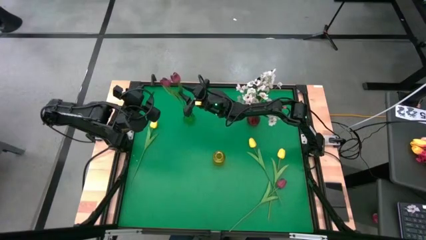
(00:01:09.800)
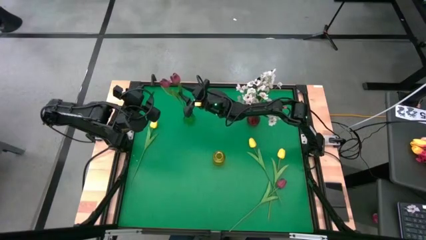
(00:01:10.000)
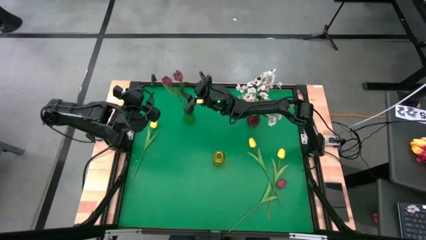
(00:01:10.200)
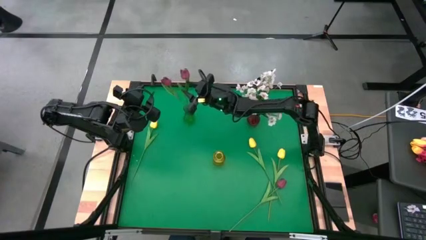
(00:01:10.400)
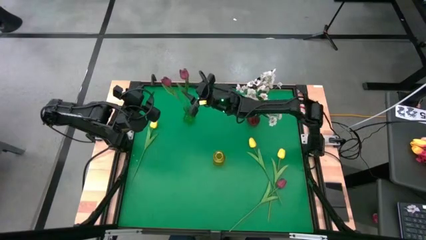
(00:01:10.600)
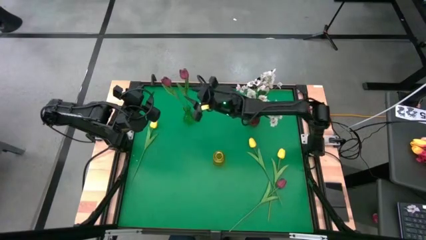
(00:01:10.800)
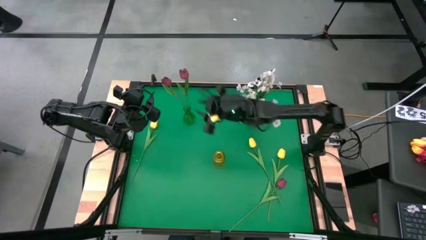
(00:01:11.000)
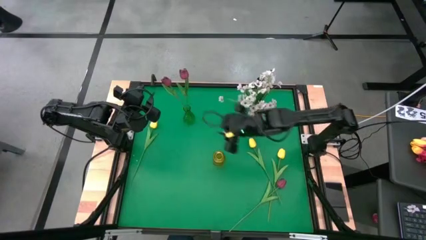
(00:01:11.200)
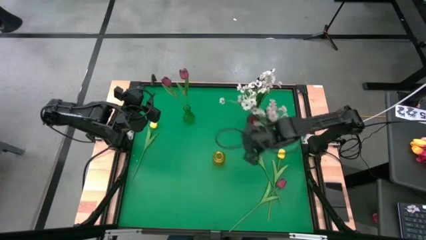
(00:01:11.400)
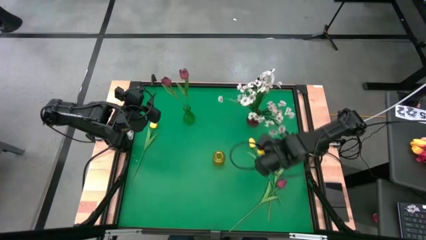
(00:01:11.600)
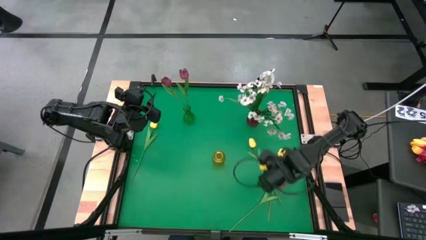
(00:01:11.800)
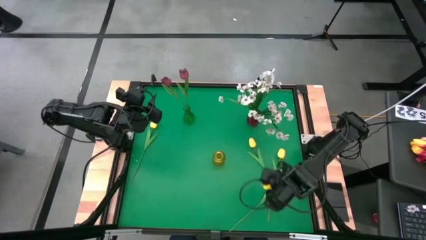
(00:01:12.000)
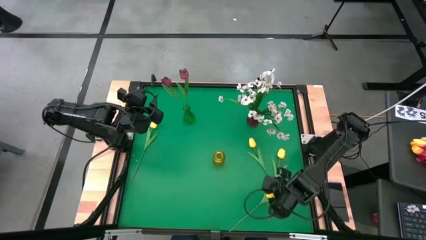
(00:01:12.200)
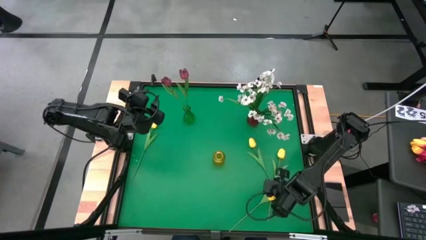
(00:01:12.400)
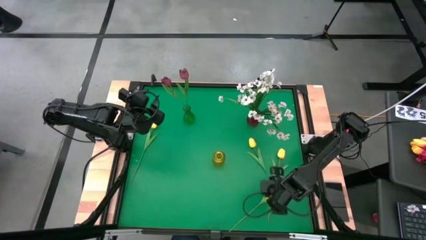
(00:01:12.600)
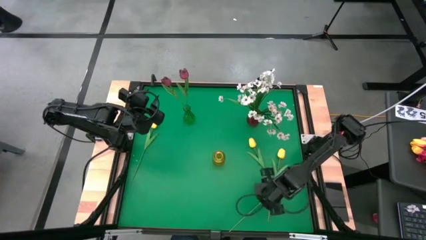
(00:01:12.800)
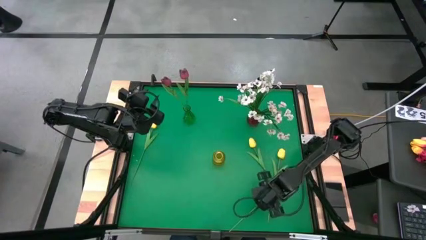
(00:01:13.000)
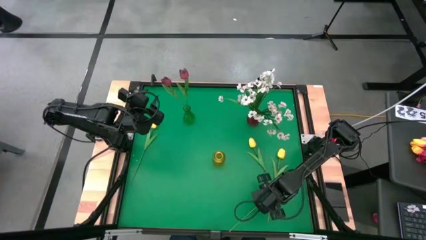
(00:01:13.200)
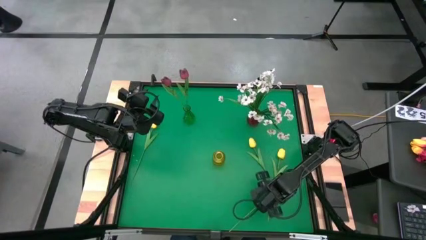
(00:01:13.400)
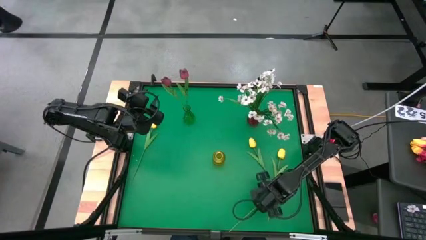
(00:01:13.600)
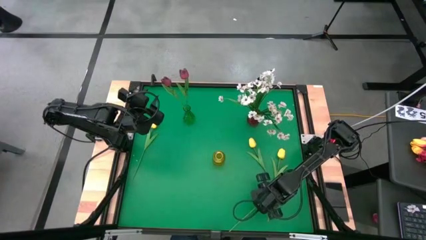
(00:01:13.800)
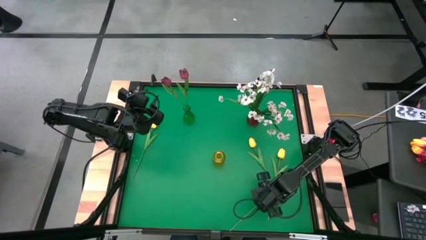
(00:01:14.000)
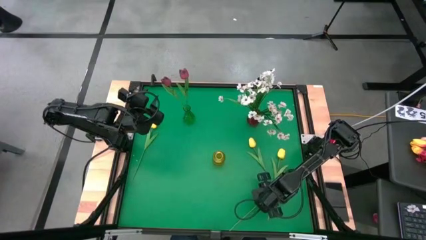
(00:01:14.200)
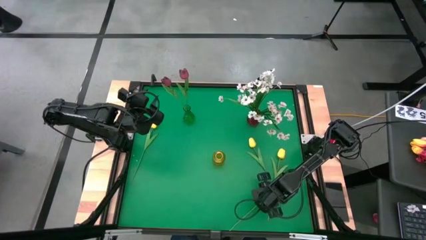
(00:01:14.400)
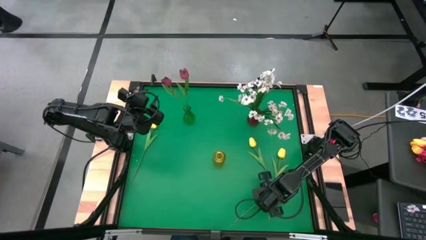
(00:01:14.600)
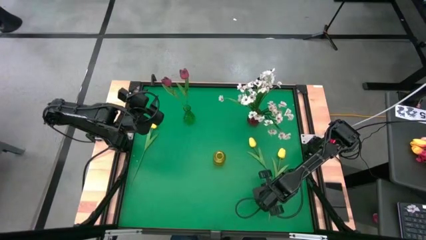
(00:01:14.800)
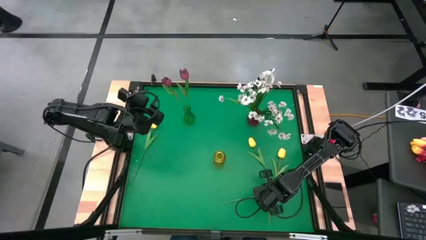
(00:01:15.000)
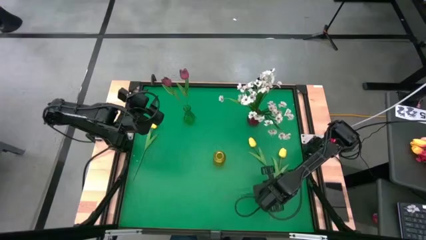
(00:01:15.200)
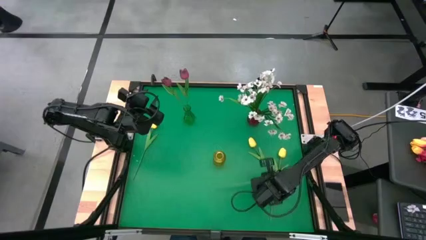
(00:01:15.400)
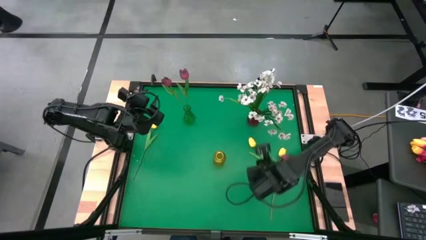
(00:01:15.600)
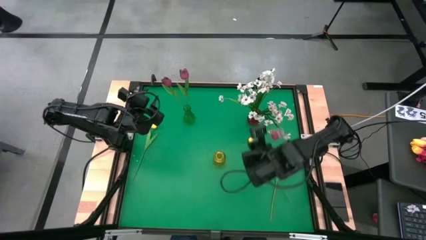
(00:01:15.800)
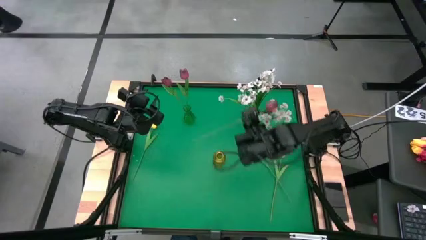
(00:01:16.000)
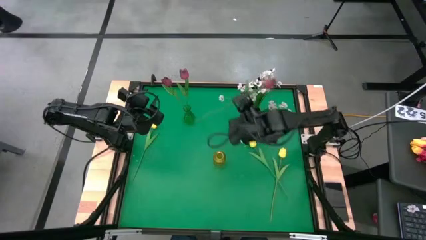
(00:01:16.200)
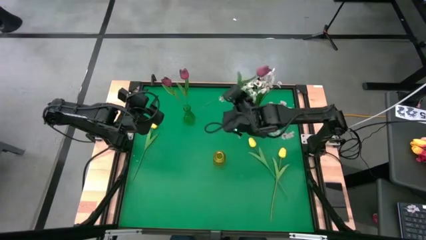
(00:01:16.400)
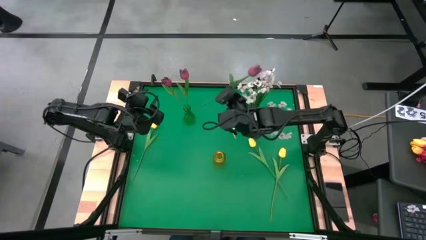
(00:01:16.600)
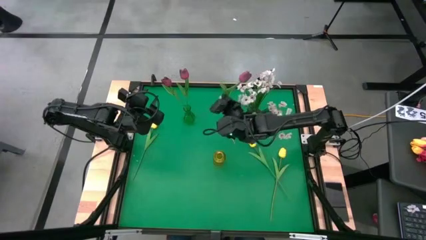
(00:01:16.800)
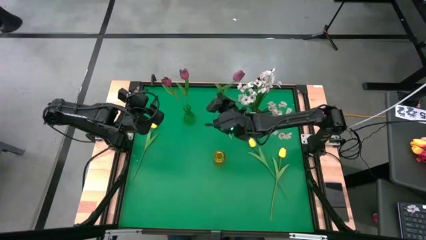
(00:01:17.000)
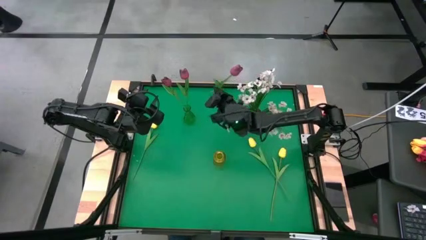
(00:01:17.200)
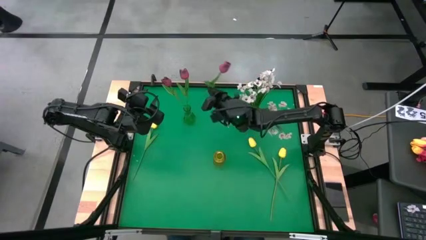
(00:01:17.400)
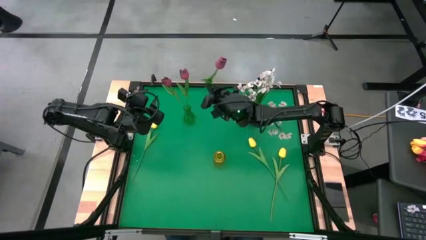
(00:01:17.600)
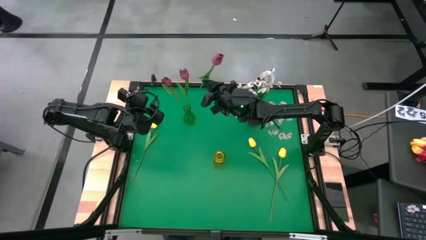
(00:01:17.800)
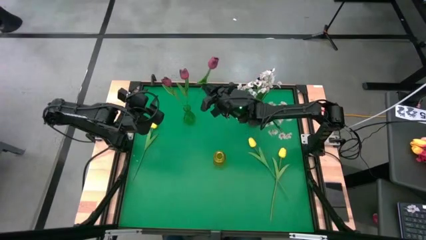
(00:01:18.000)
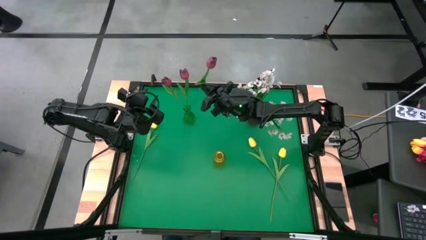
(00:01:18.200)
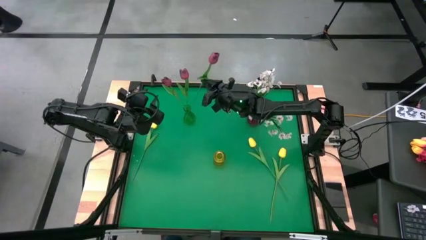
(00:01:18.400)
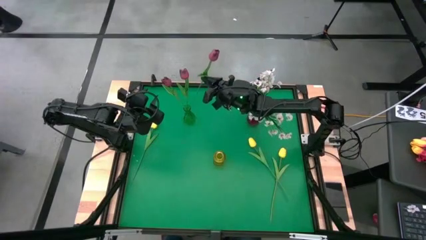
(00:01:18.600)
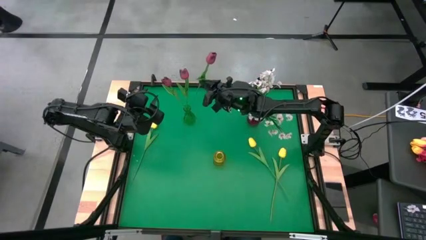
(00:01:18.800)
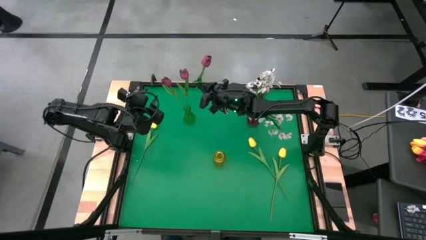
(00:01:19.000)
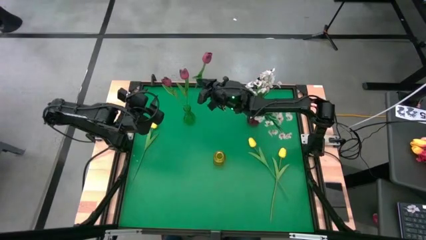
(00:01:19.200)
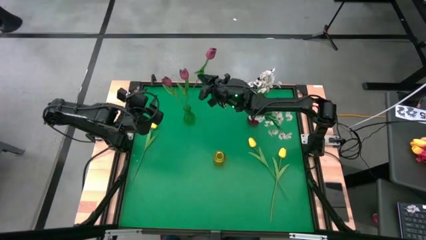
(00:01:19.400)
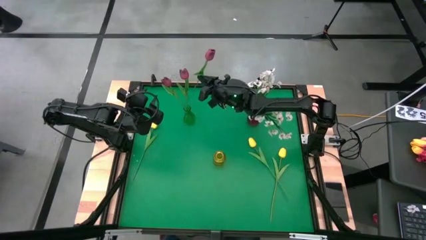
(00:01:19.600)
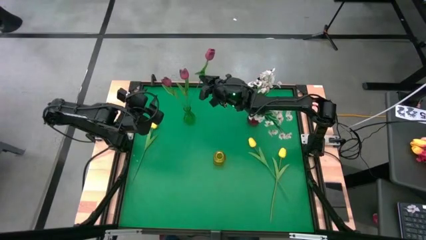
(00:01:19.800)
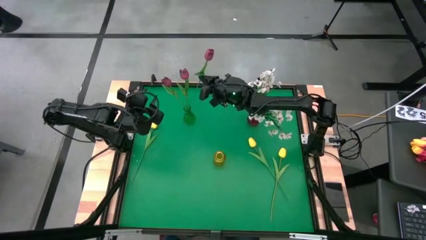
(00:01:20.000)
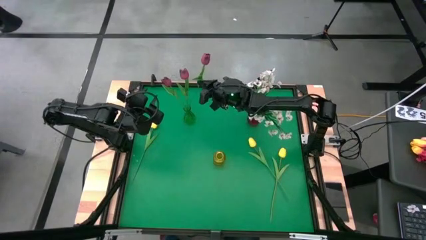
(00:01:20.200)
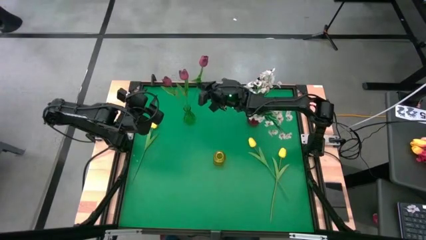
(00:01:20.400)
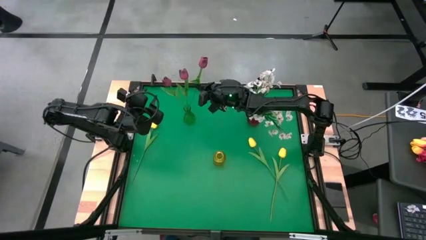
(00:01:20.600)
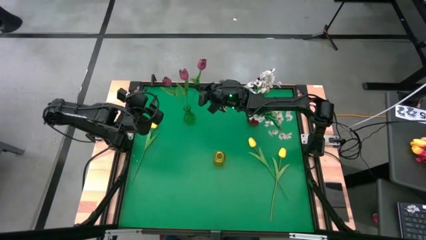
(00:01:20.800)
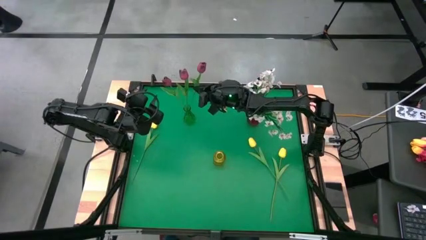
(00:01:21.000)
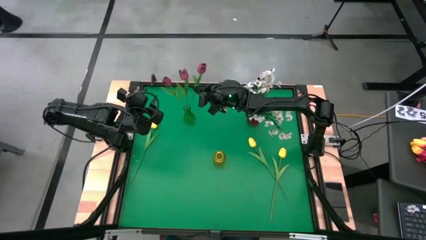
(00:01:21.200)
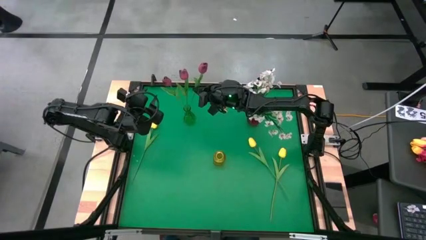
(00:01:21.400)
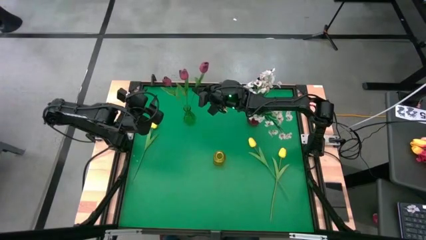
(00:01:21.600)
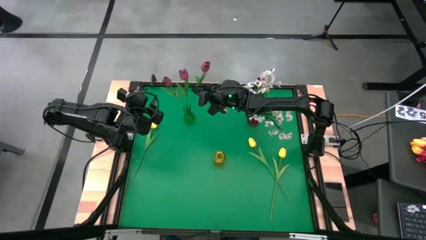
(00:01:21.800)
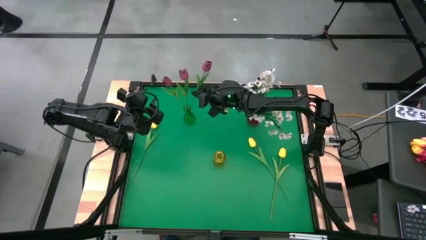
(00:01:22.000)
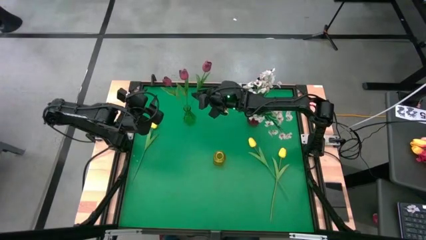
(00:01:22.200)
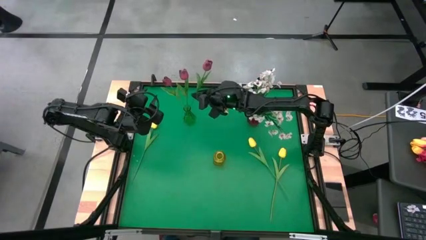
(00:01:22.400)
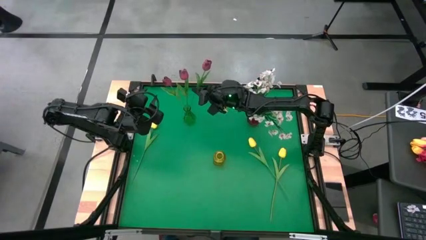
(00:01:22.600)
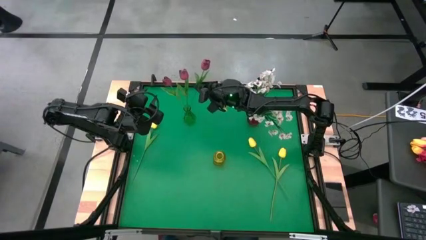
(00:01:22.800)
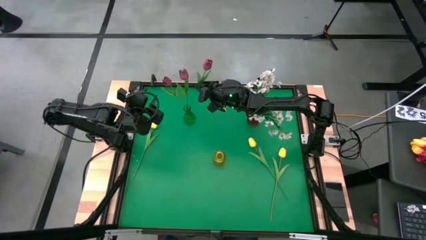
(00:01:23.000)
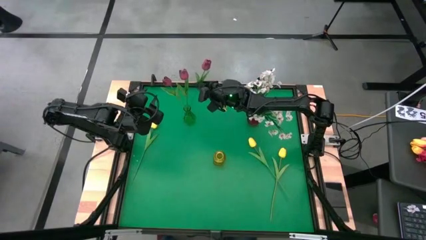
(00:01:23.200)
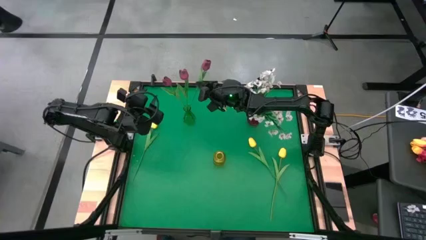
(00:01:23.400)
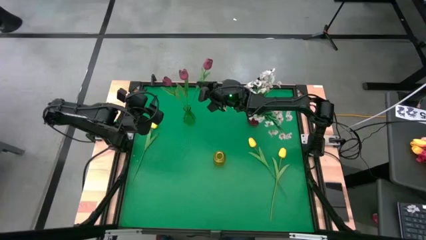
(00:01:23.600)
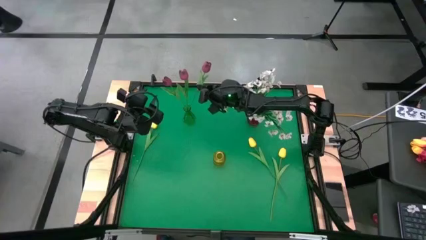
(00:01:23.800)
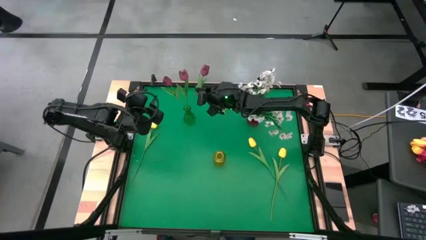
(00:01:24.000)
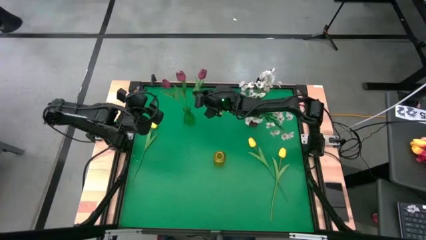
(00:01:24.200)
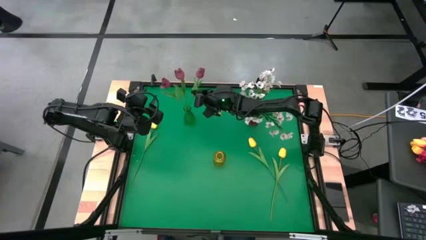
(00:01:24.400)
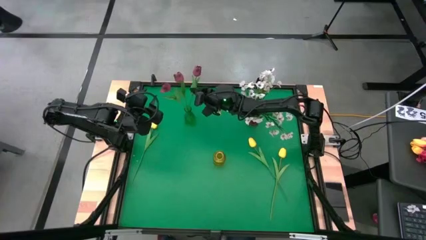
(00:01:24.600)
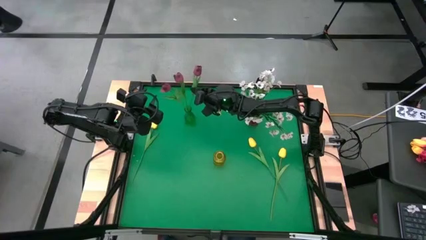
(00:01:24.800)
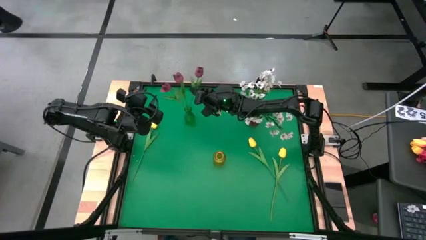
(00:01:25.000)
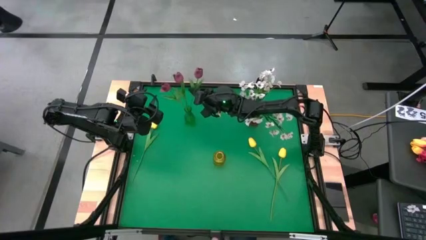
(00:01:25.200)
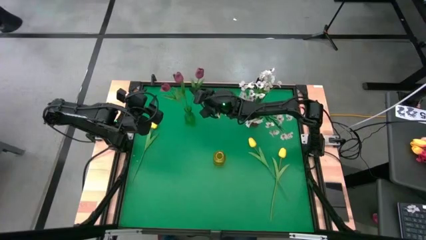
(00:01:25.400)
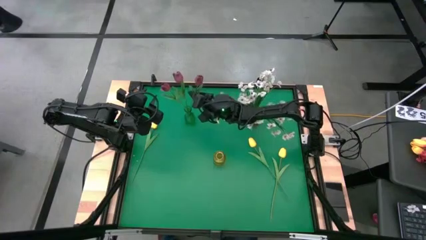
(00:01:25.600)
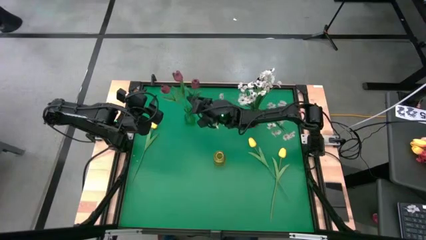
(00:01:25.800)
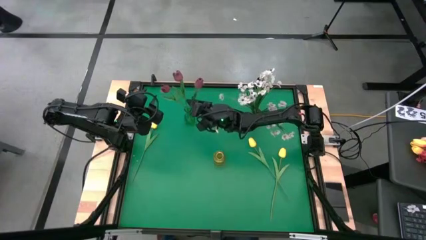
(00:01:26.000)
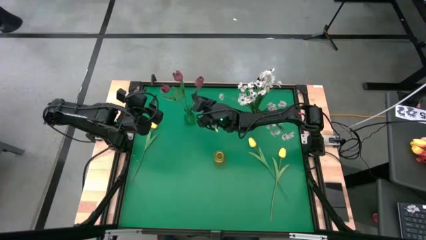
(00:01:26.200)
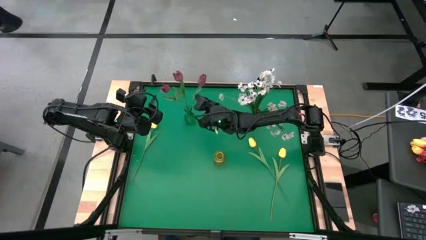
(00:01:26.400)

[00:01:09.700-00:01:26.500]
Task: Sort flowers into vase by color
Put the red flower into the green vase
